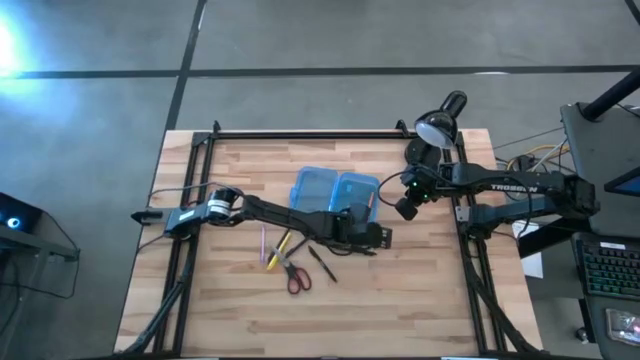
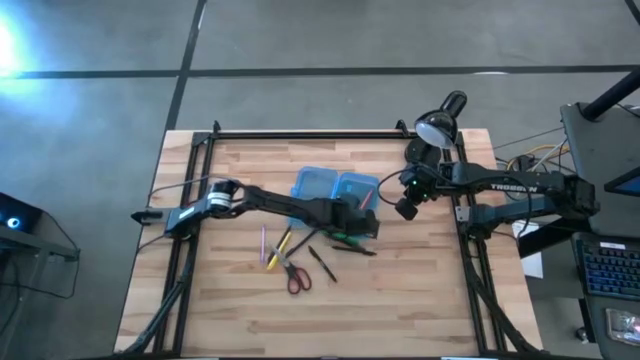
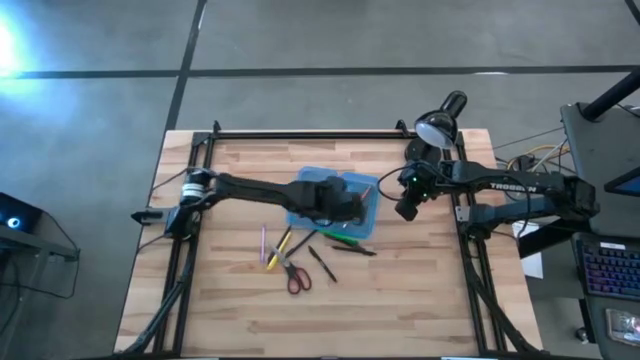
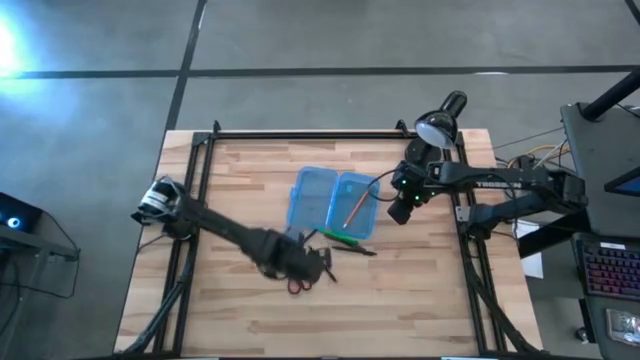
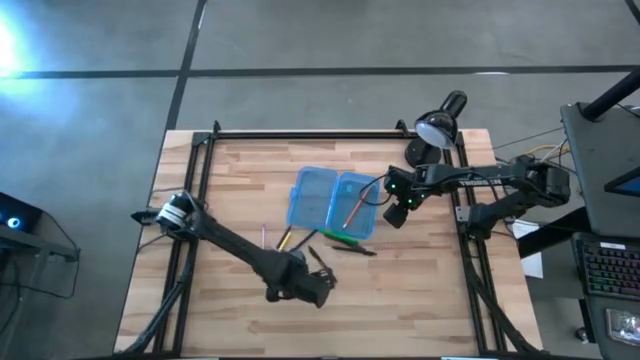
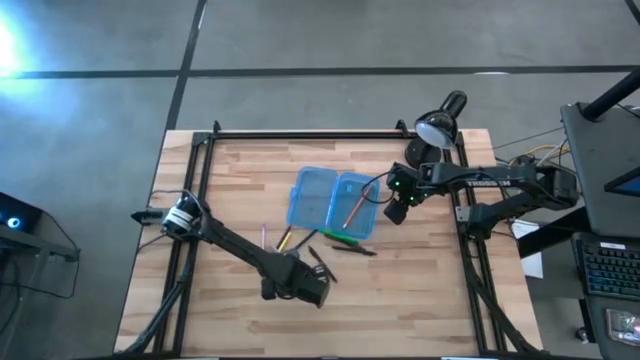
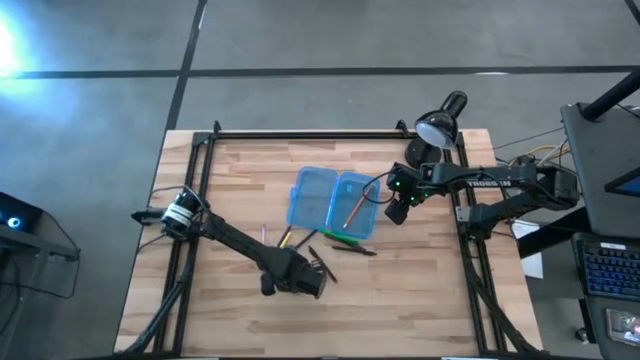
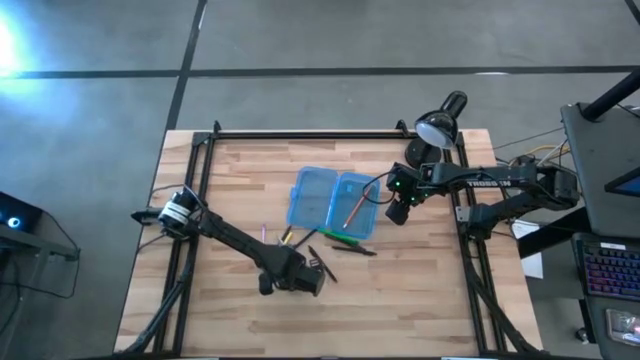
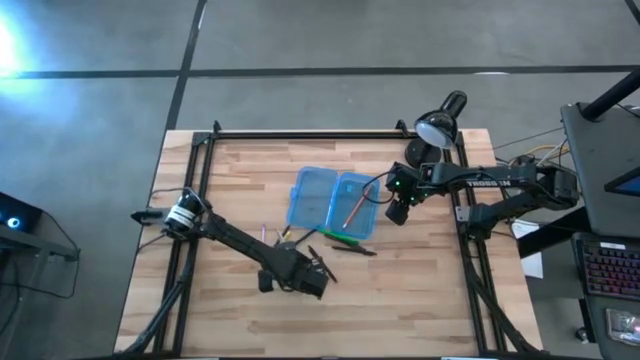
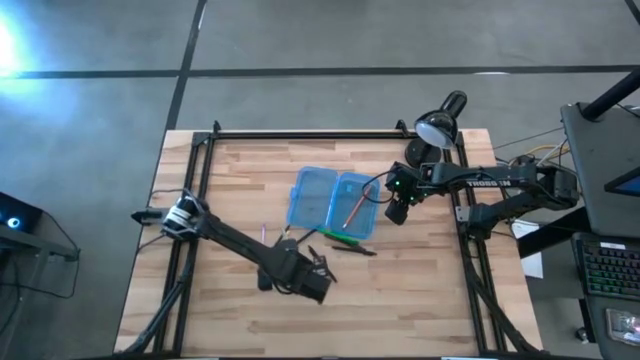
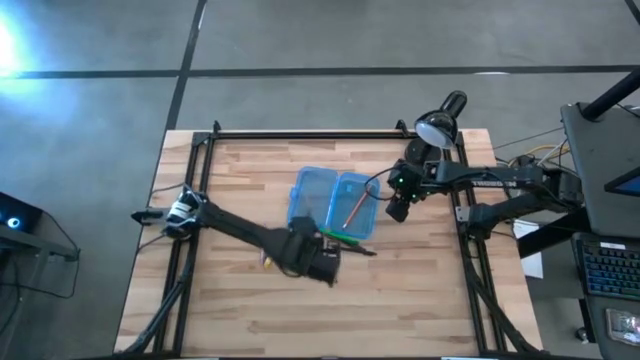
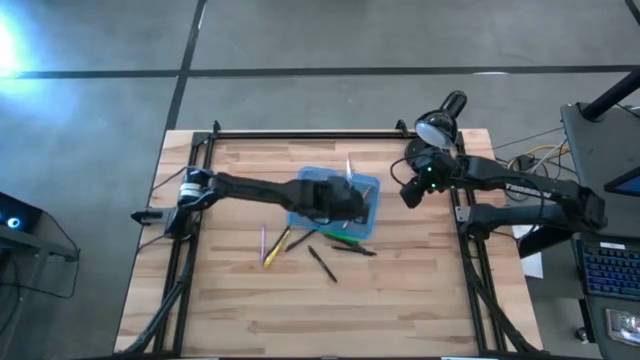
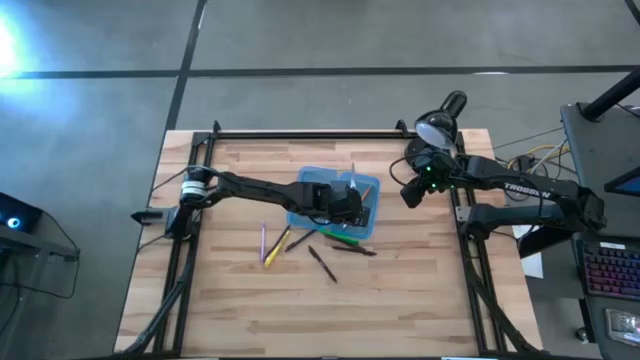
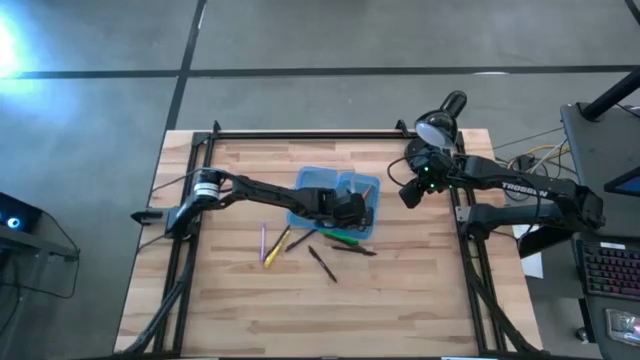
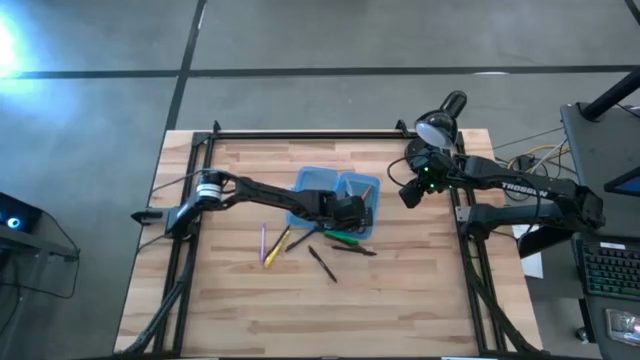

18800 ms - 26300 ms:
Task: Pick & place school supplies into a supply box
Put the black scissors into the supply box

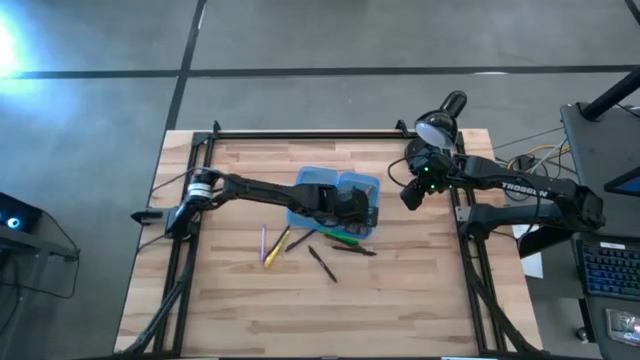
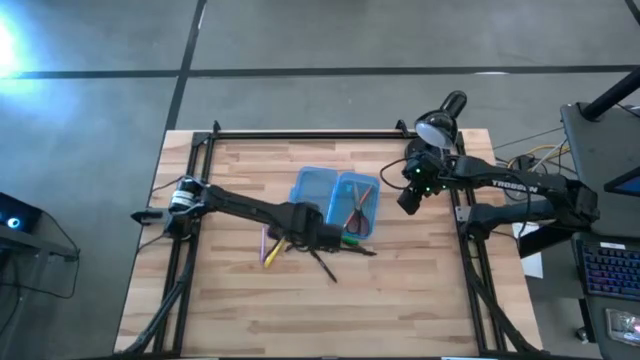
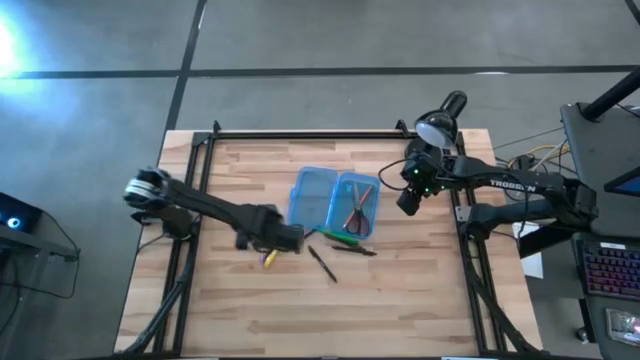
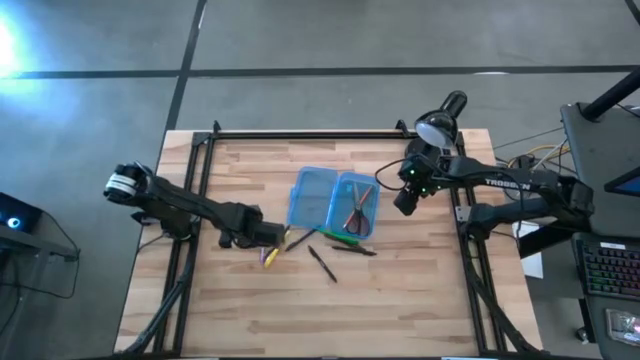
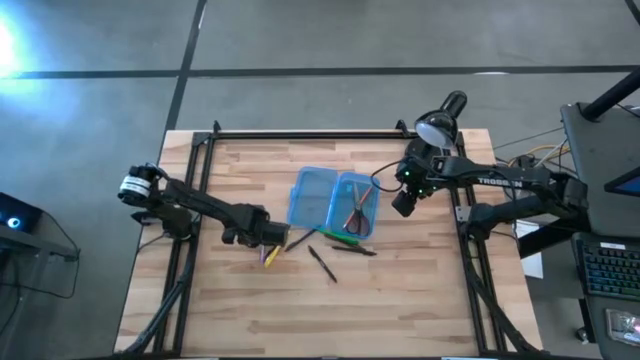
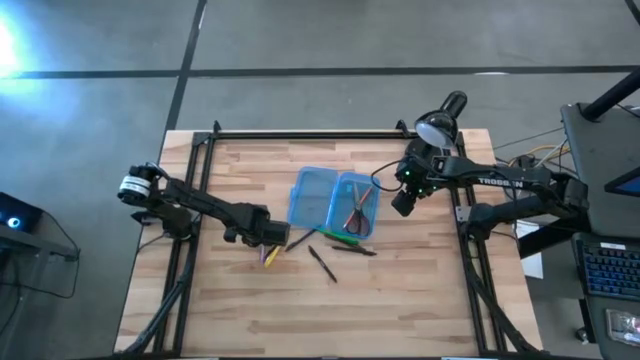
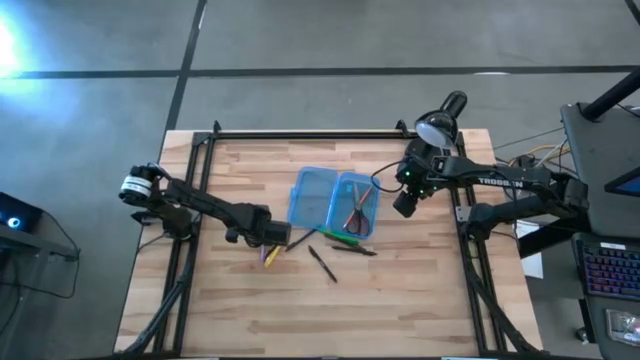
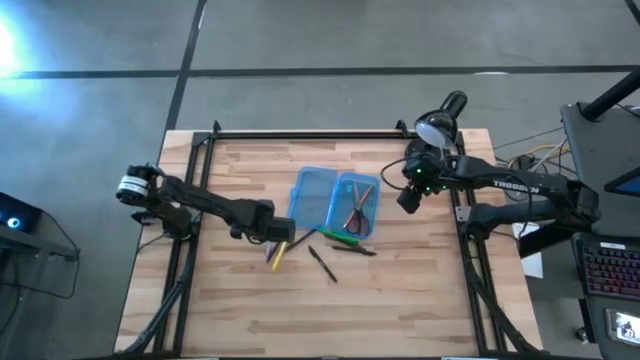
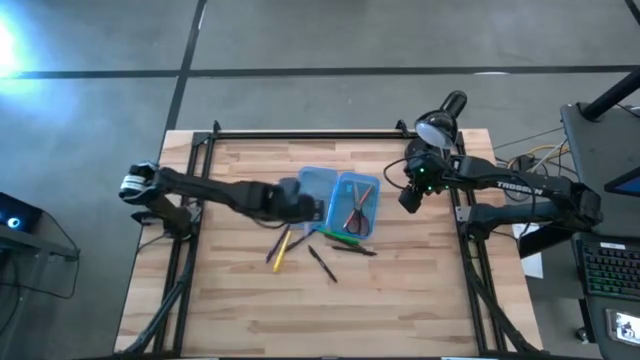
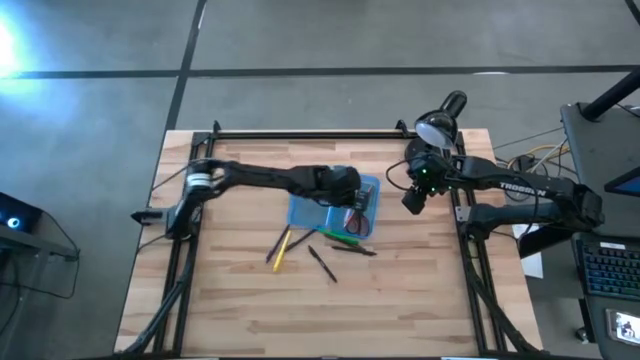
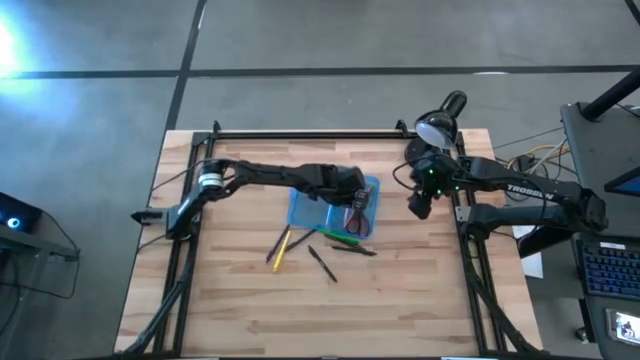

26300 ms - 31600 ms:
Put the purple pen into the supply box

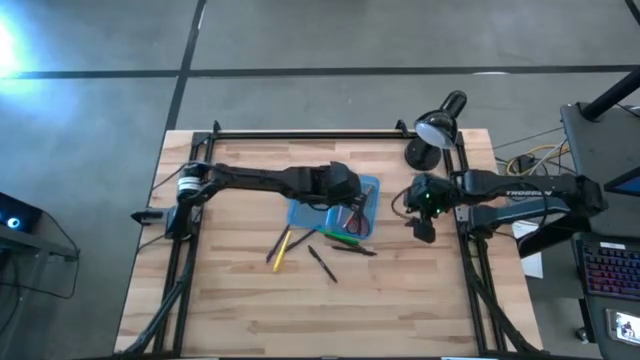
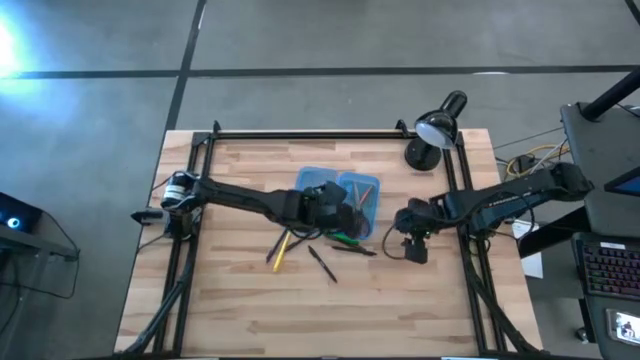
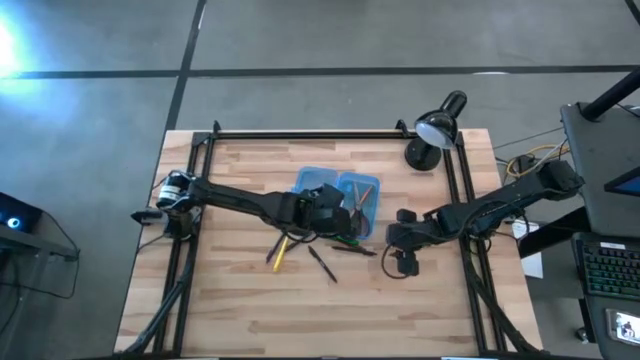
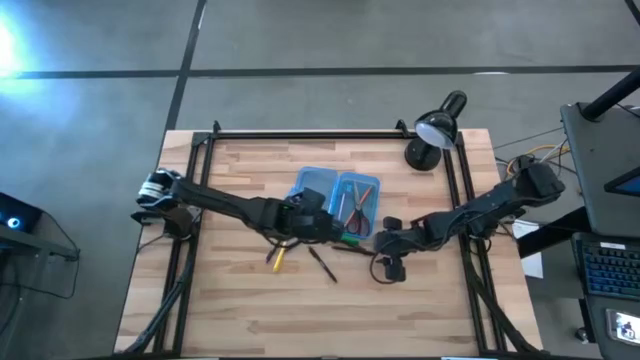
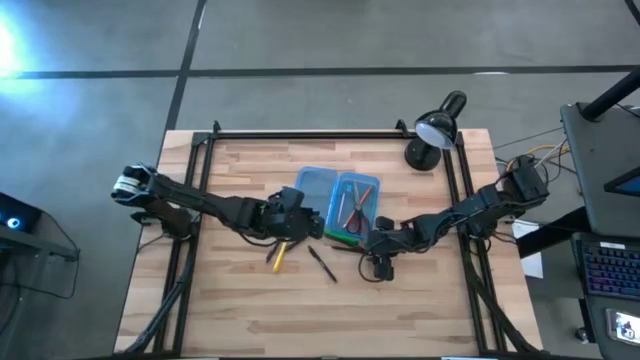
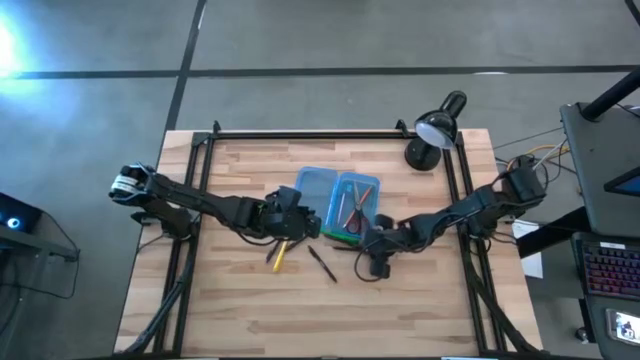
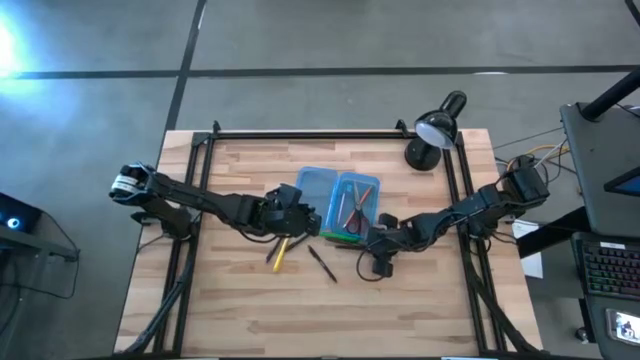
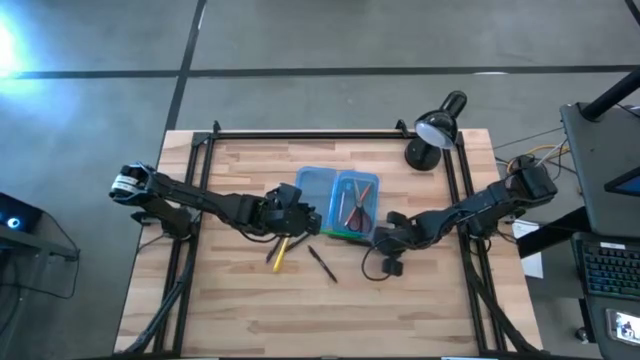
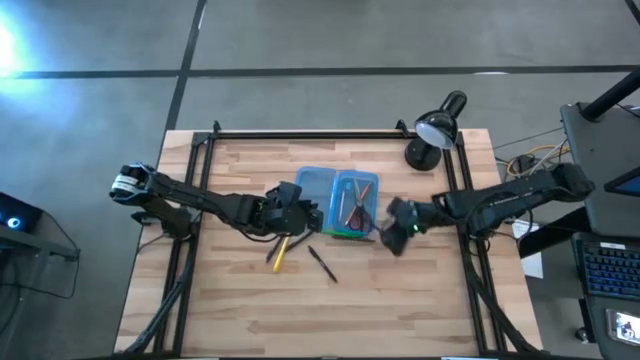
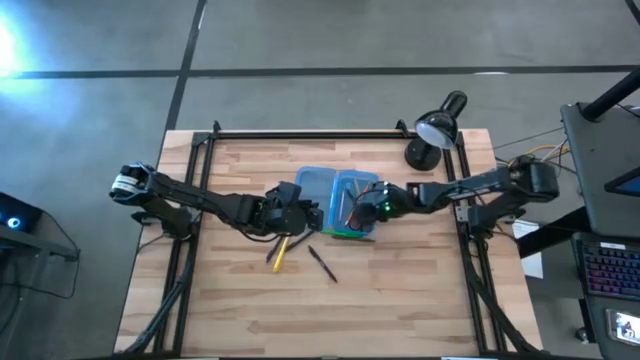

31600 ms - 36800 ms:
Put the black pen into the supply box

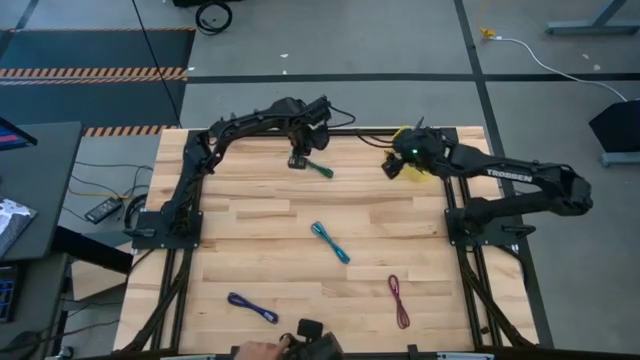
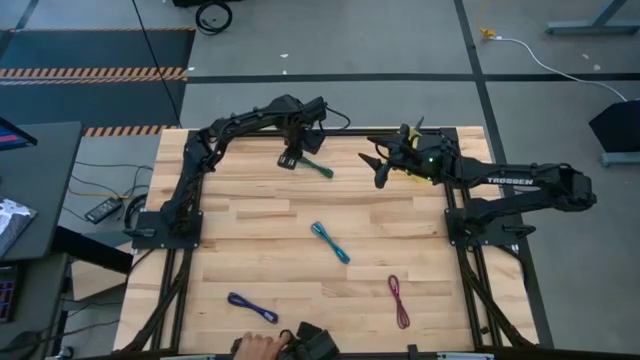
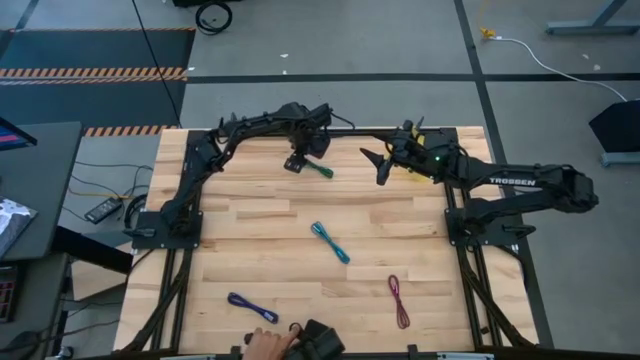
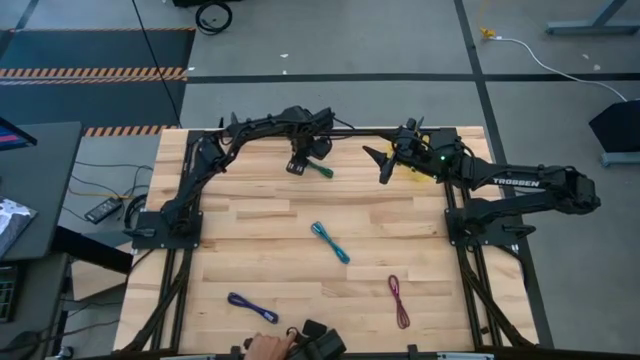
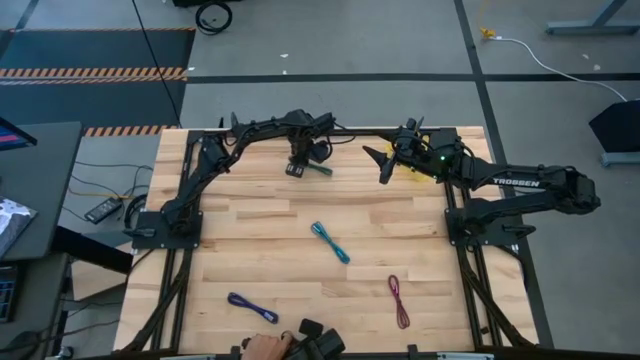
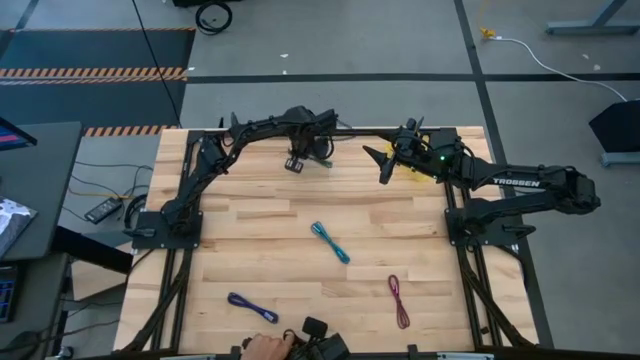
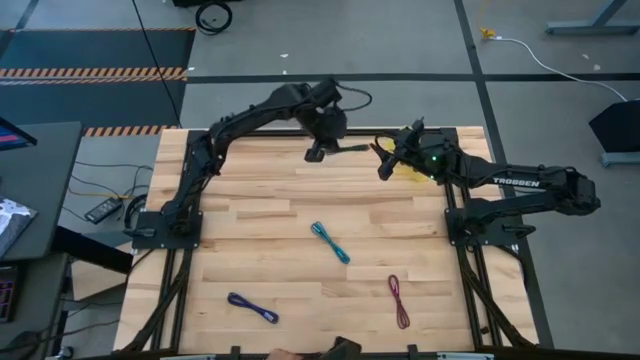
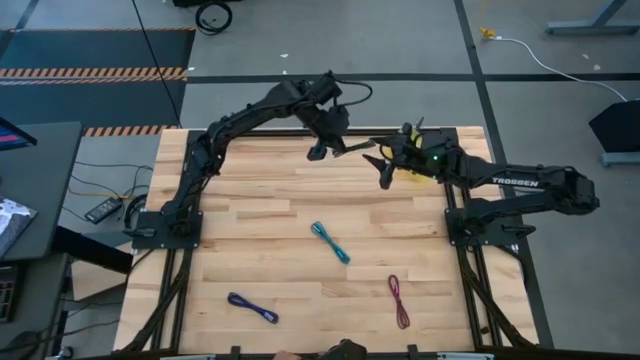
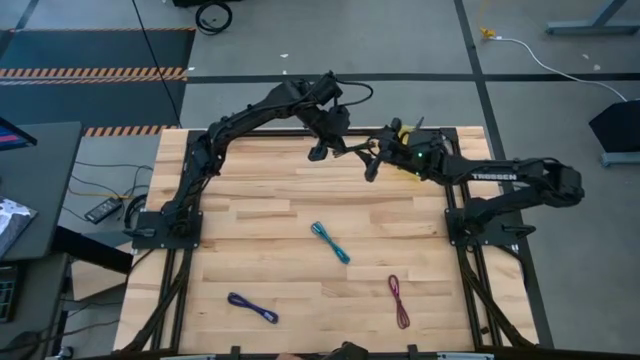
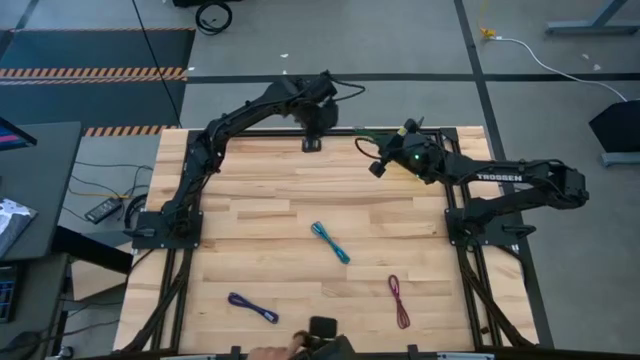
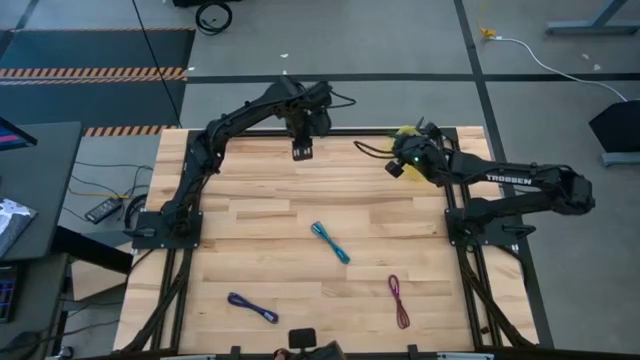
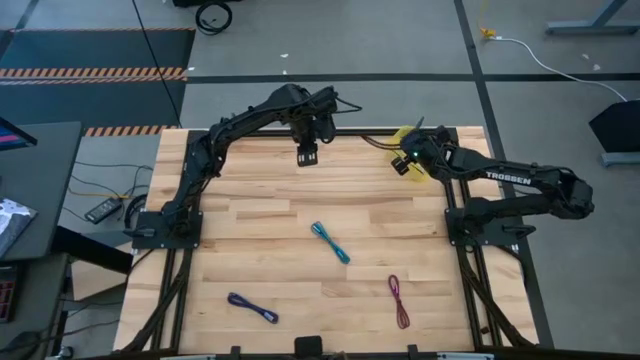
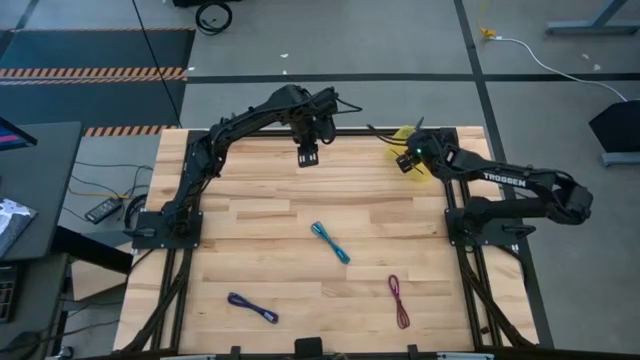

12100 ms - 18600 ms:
Task: Pick and place USB-C Cables
Put the green charger cable into the yellow container
